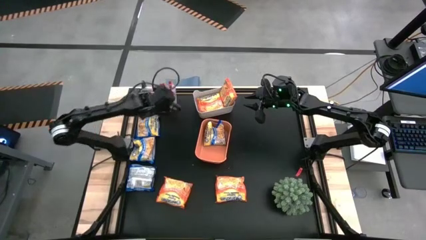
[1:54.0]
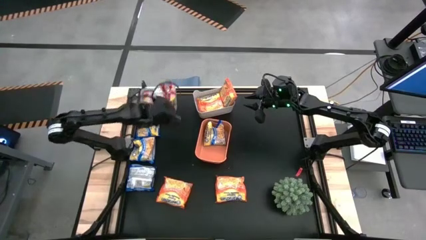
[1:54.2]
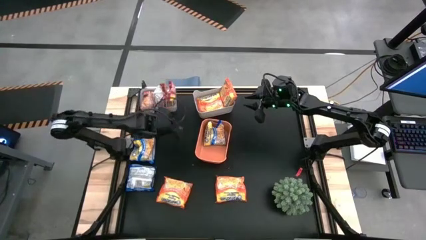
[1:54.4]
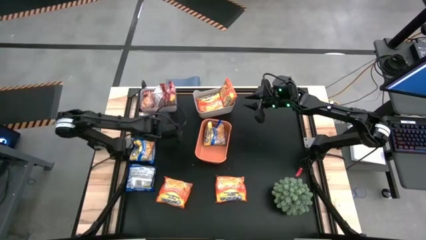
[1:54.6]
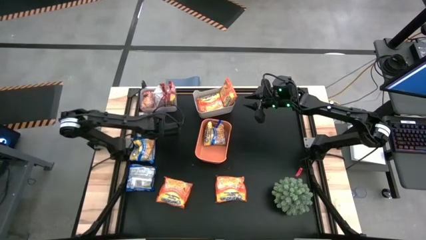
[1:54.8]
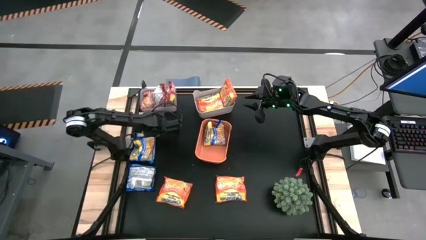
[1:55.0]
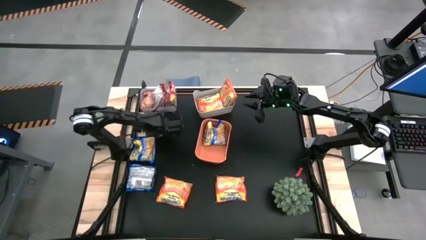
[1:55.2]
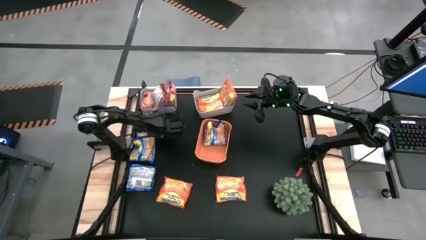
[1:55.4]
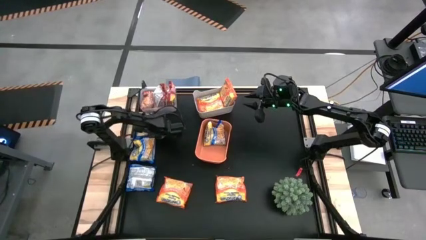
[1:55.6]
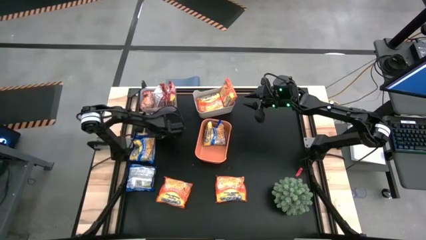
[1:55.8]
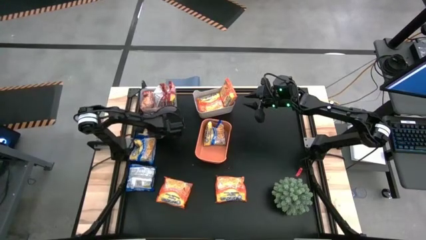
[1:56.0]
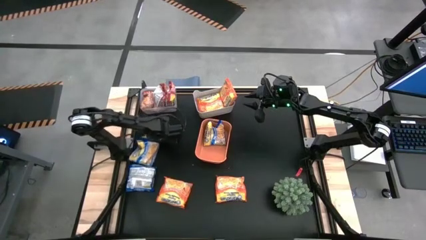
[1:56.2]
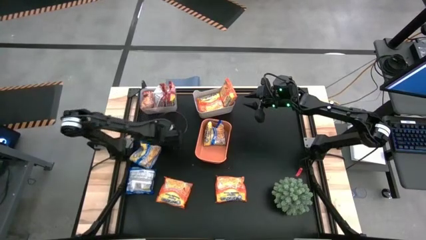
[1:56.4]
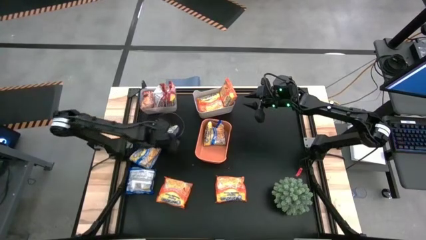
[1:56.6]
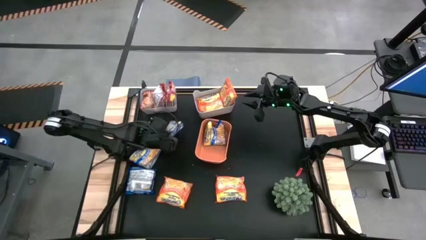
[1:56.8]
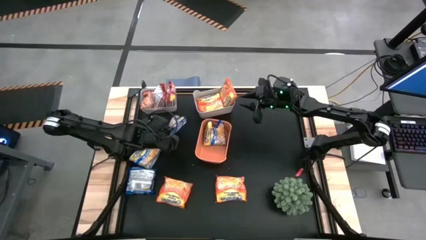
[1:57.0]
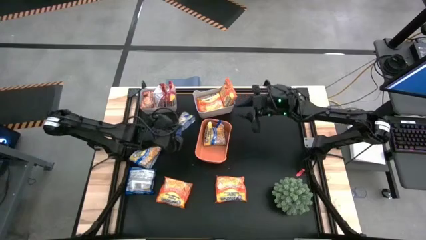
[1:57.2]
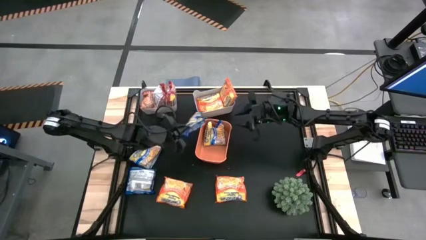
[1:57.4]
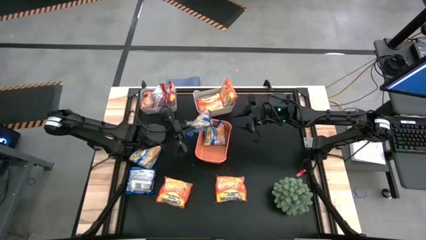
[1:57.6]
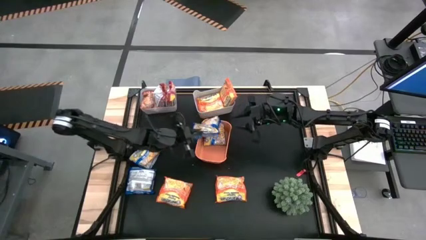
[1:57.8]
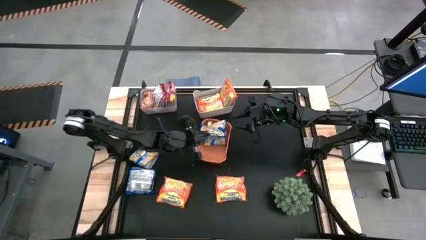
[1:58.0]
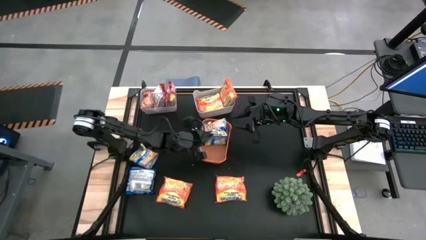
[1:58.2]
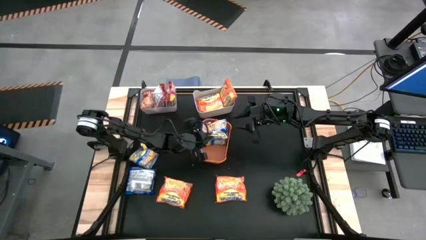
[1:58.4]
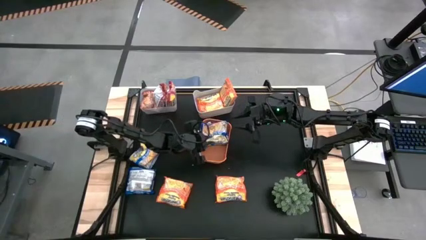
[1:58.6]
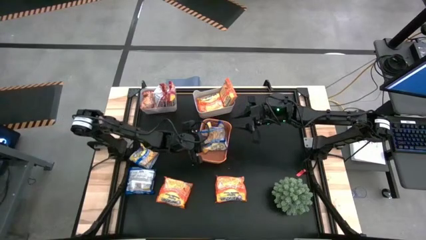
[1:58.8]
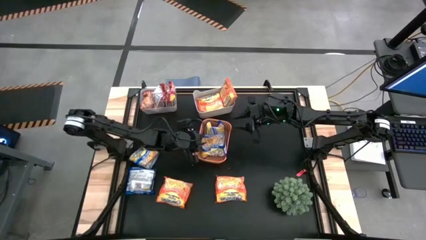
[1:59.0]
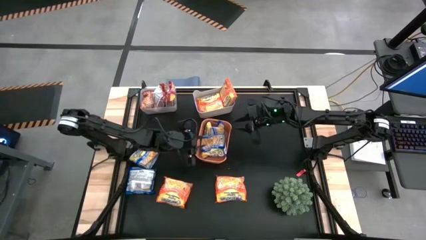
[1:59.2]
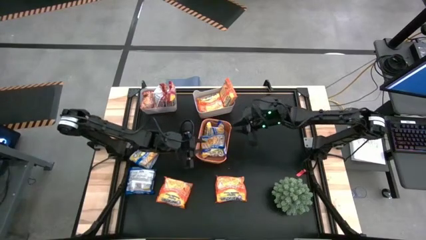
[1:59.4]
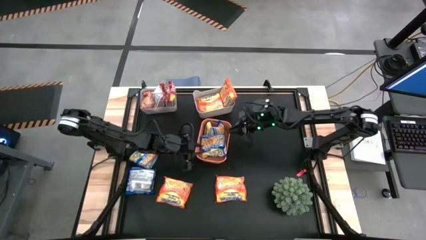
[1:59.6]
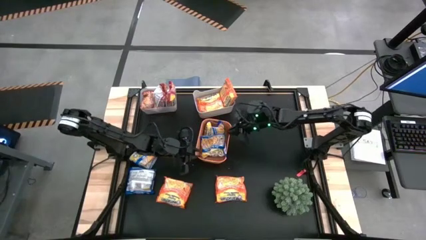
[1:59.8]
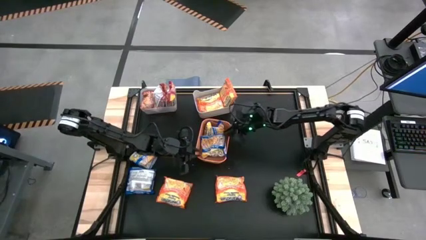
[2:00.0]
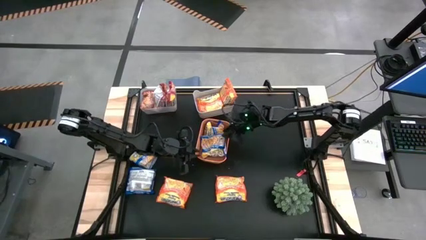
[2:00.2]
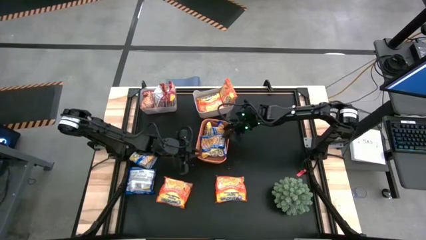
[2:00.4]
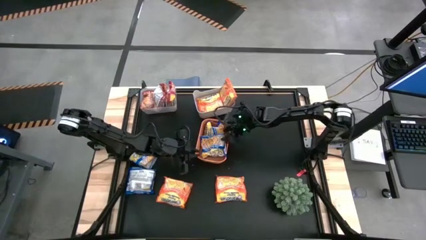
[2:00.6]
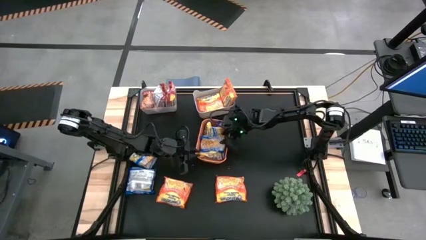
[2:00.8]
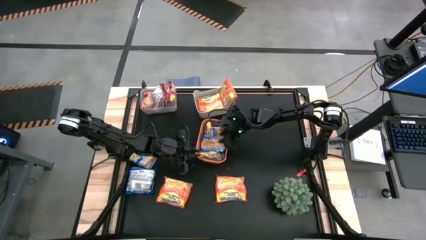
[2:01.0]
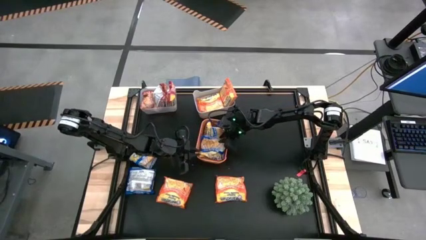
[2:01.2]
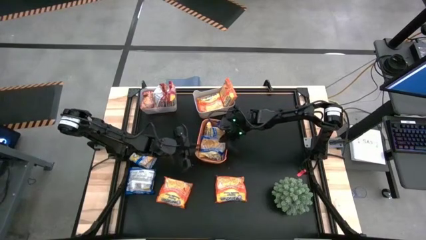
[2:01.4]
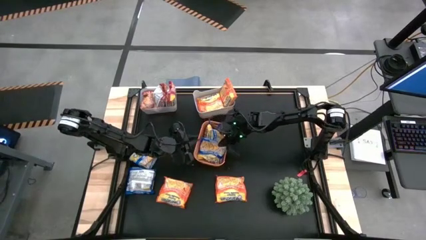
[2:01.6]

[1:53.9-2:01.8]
Task: Sort Maruchan noodles
Put the blue bag into the orange bin

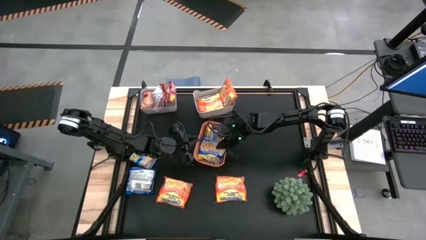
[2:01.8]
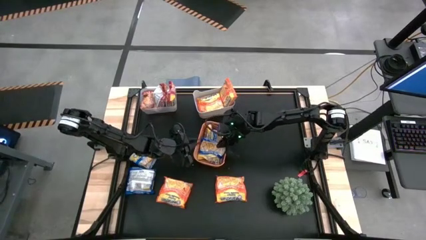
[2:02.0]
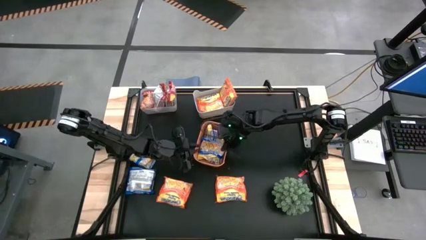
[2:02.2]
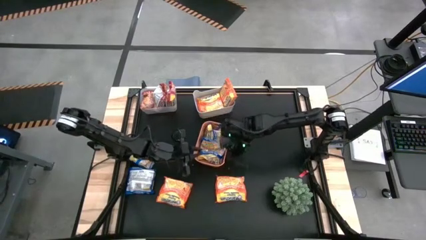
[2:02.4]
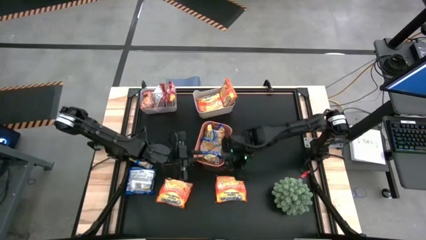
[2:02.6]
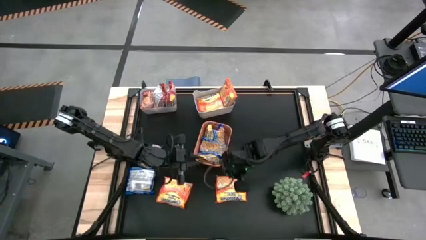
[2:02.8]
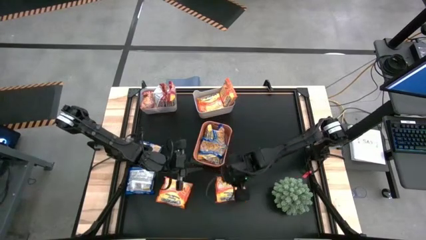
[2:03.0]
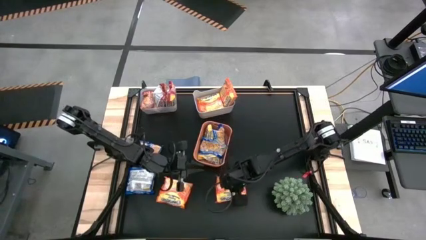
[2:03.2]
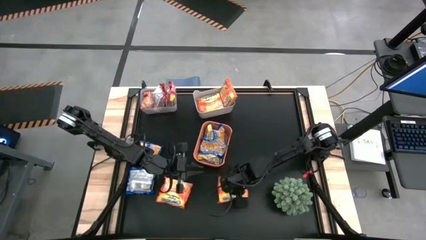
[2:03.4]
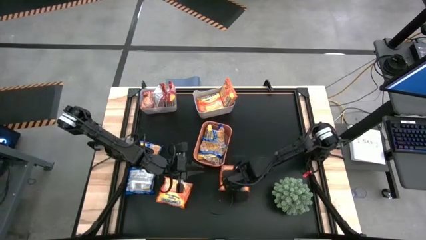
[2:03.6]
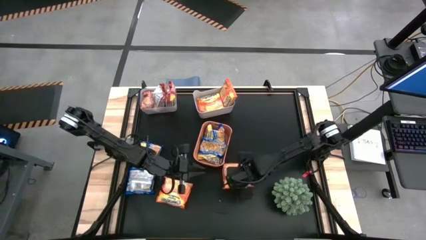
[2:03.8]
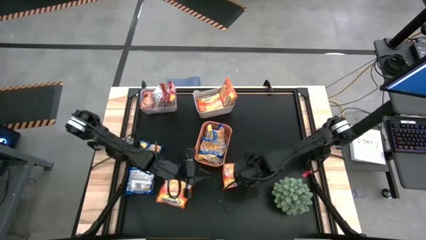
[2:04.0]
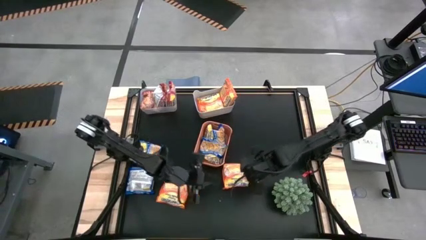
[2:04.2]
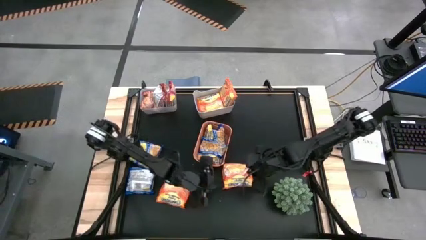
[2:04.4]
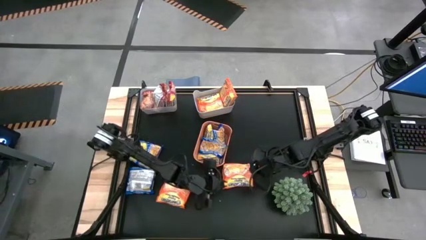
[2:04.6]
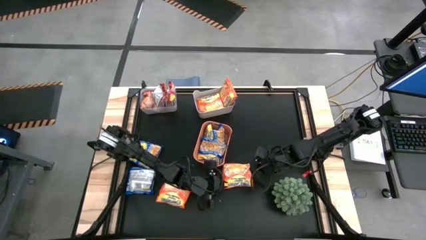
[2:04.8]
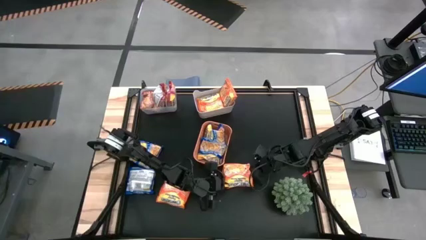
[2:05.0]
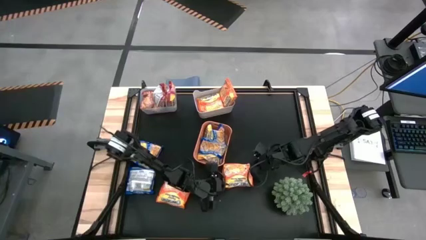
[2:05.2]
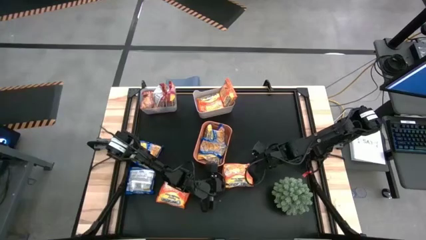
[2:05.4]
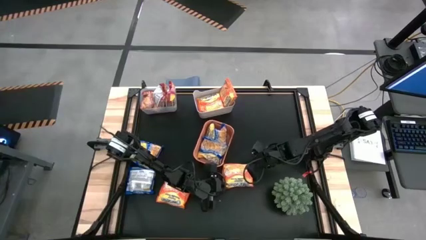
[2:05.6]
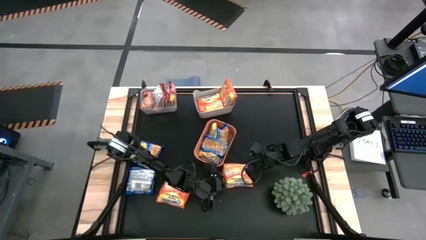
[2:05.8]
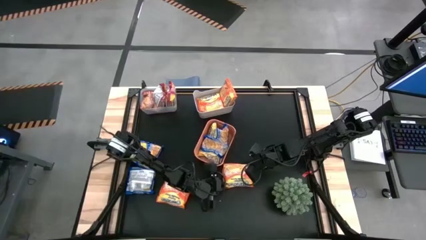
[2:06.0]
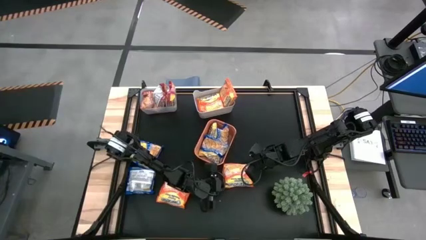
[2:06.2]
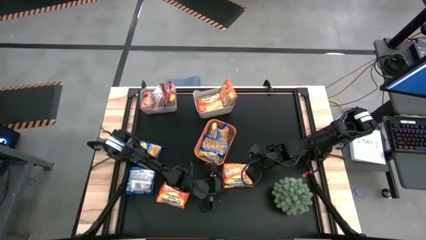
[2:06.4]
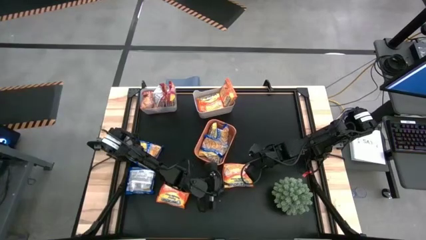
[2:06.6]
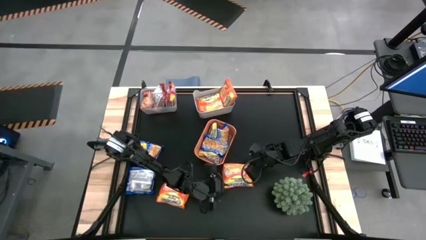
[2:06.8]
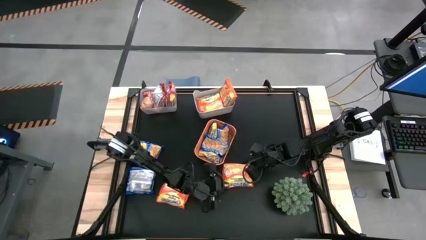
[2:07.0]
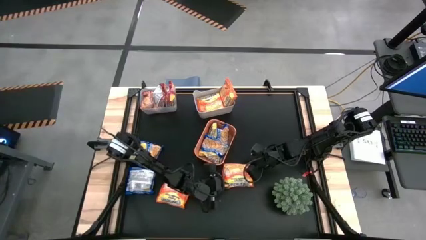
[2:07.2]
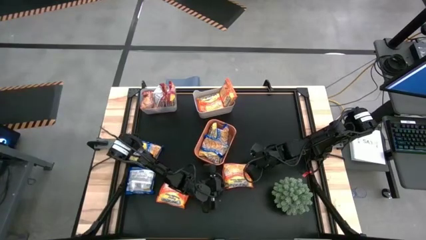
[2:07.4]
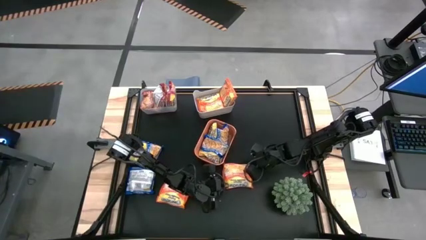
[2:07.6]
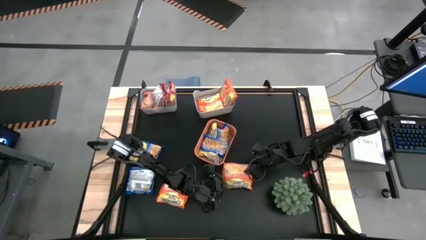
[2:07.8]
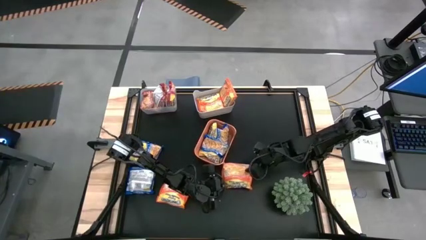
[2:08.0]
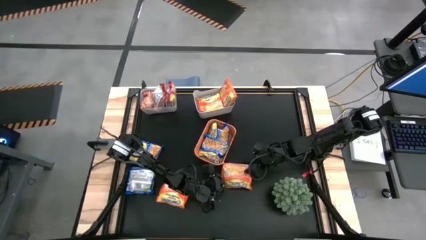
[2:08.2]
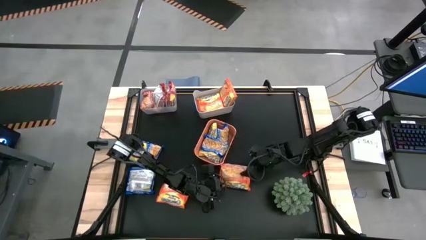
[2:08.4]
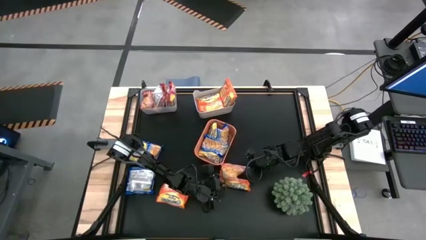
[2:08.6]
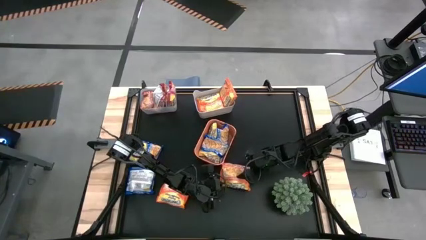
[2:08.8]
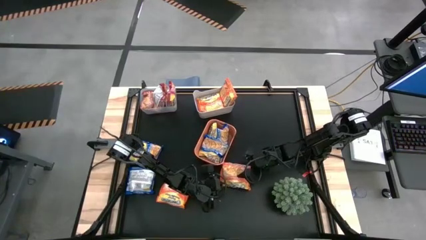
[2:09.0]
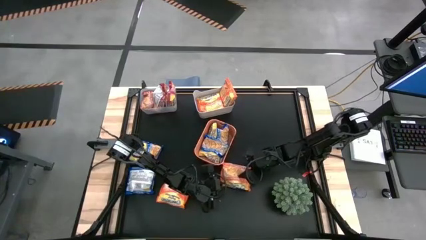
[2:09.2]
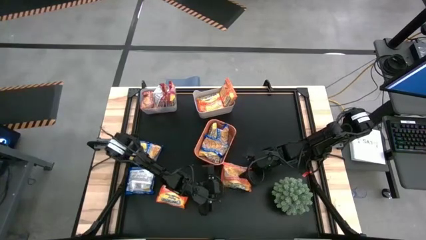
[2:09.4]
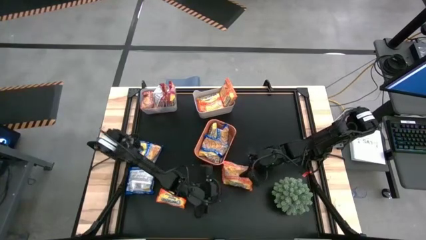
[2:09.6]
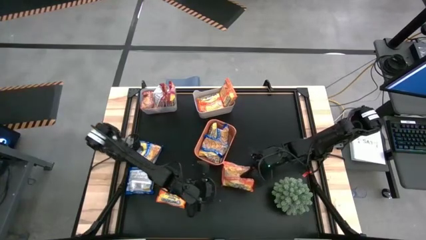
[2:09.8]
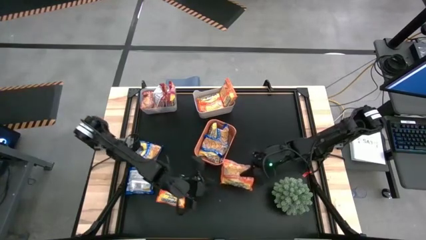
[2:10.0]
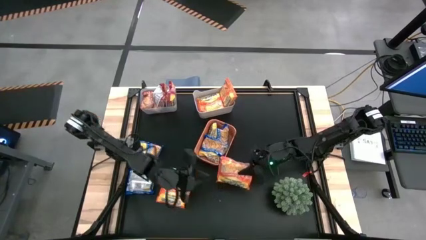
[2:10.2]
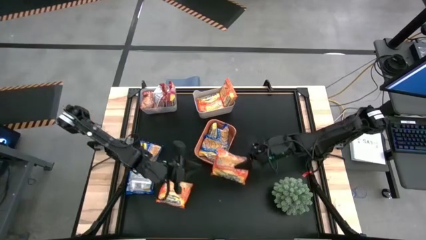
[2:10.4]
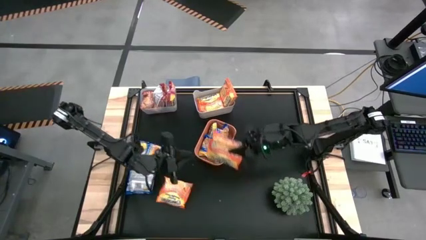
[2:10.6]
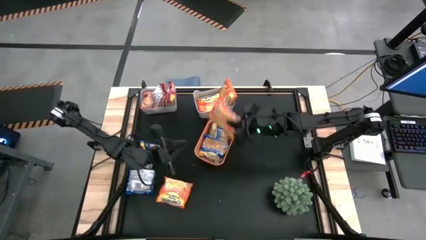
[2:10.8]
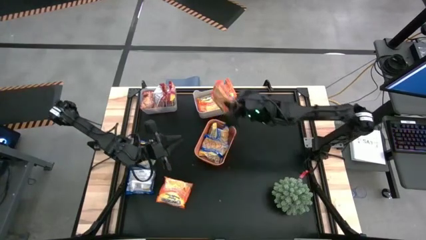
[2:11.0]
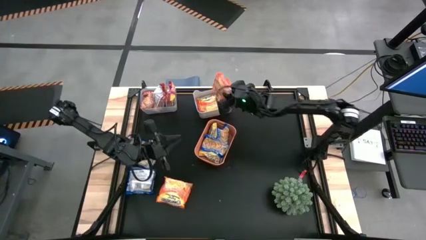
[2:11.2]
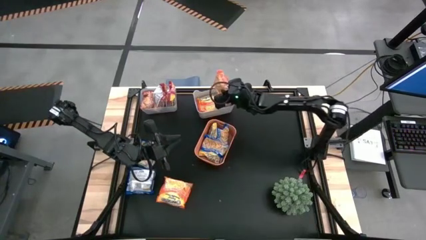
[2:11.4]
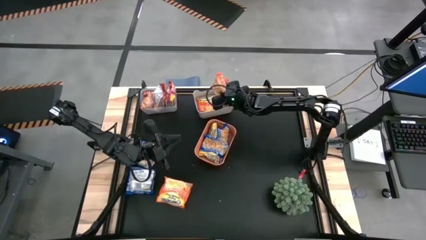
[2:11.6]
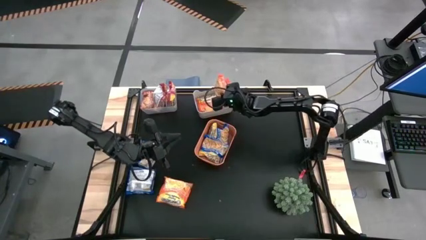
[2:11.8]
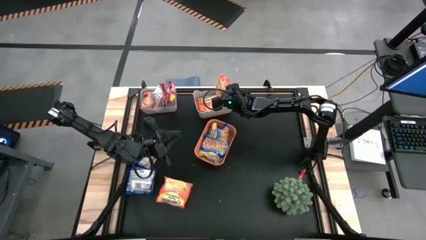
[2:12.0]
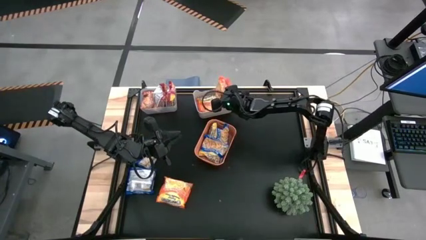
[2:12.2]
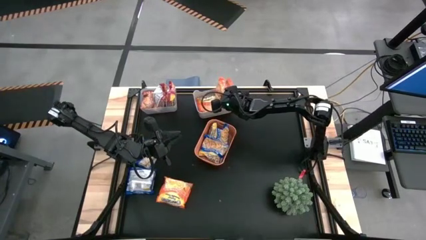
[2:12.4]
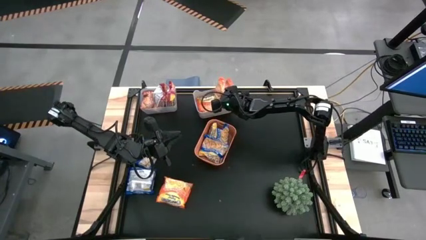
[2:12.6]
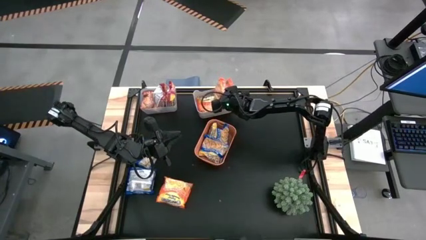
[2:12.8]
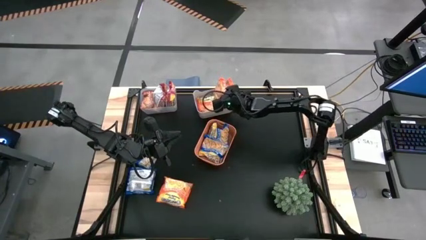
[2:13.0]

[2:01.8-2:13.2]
Put the orange bag into the white bin
